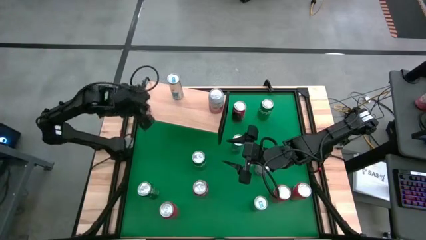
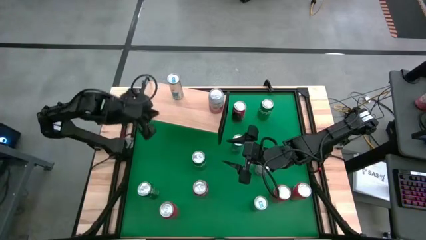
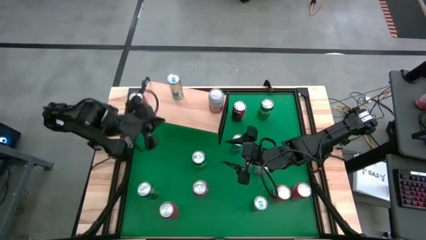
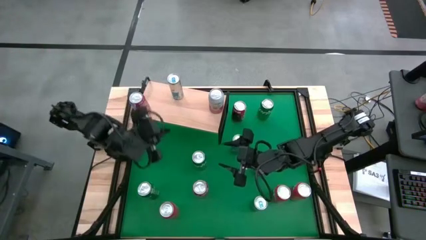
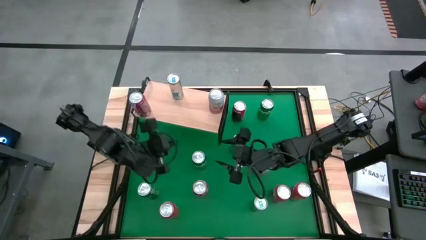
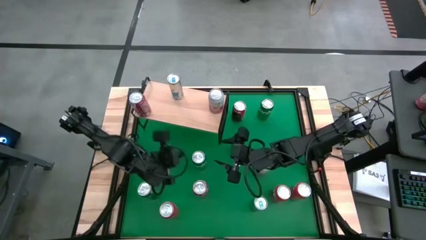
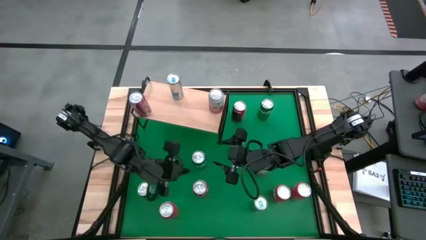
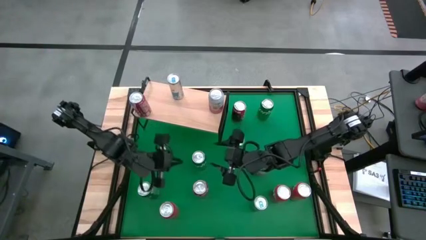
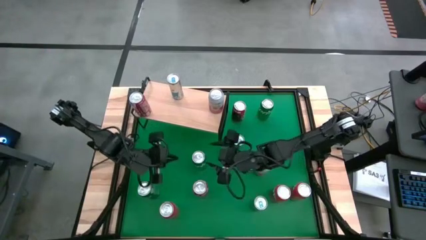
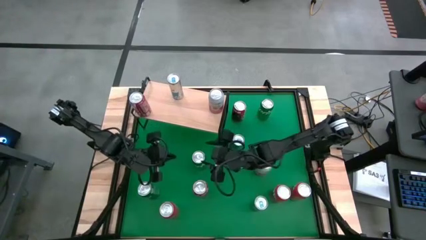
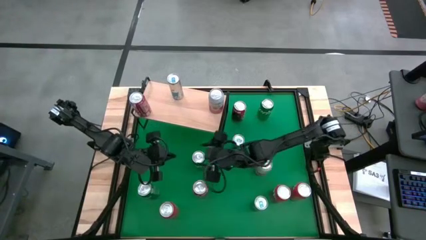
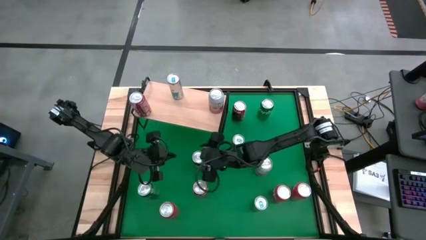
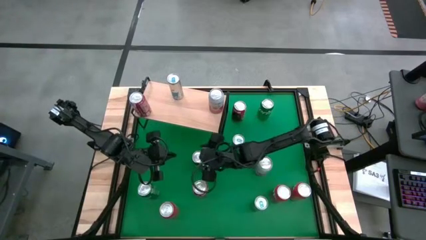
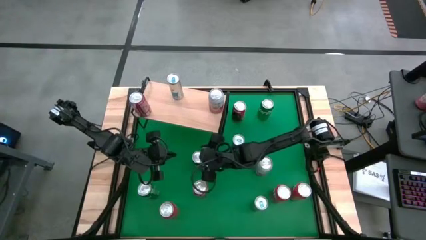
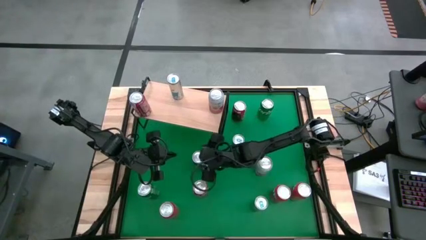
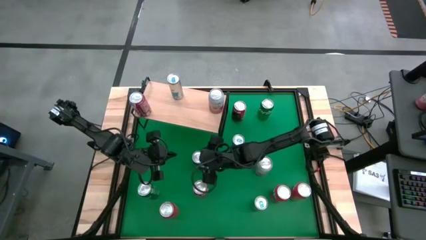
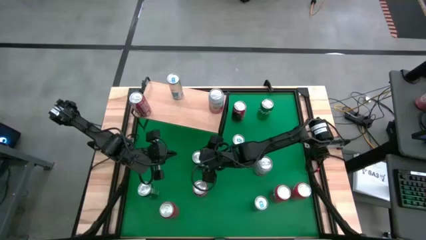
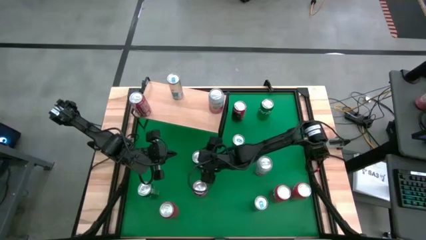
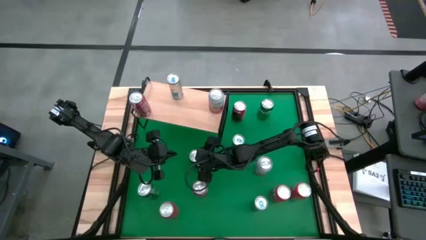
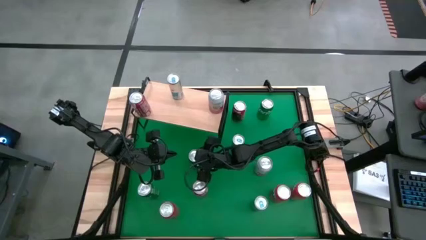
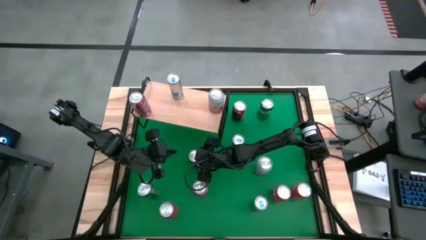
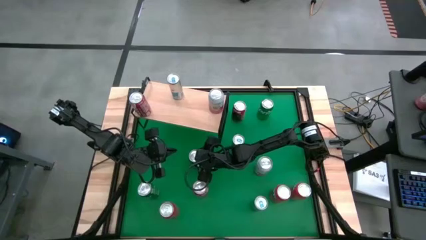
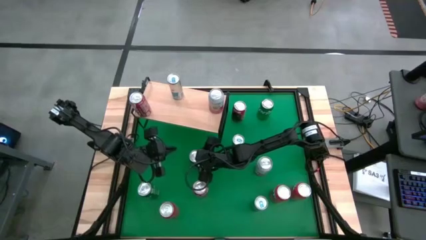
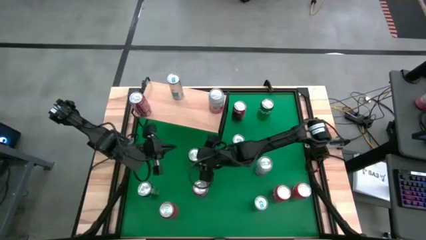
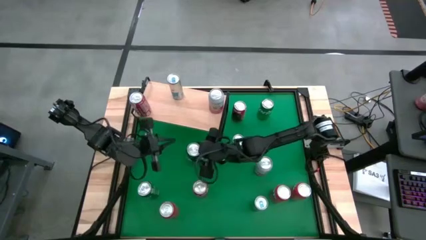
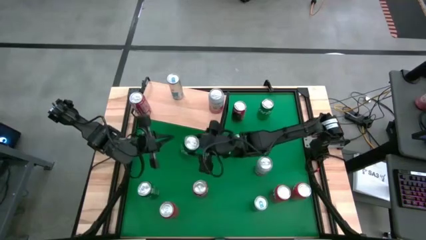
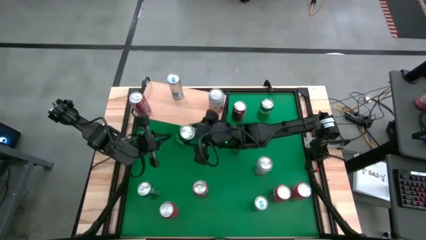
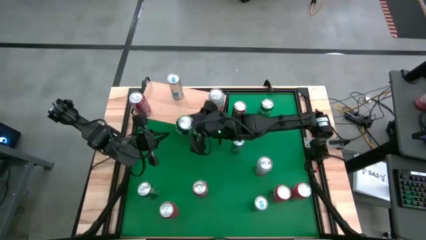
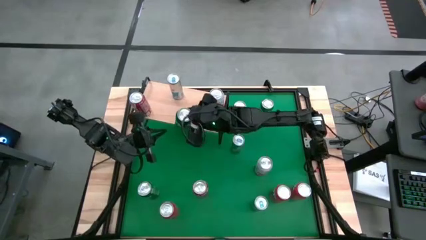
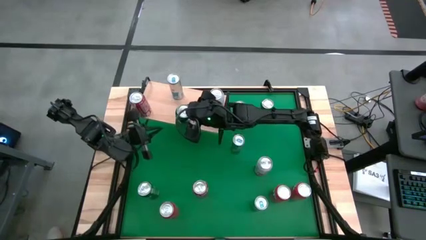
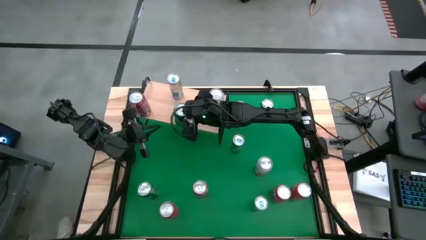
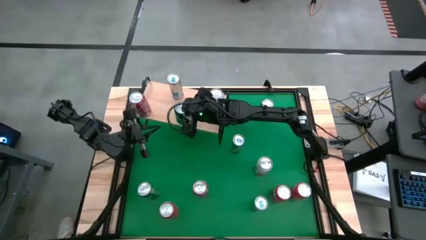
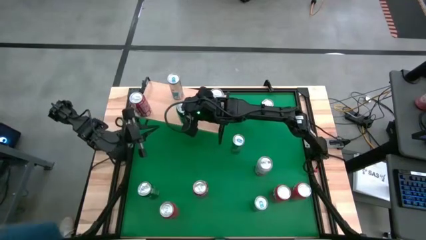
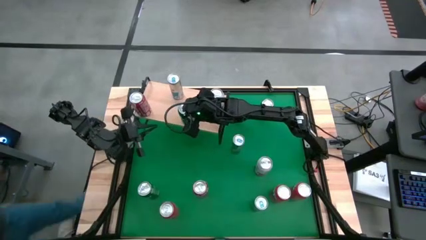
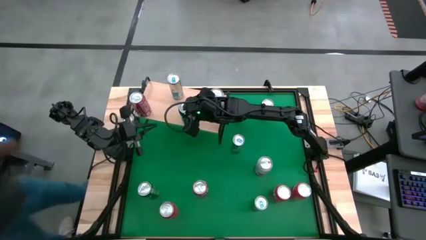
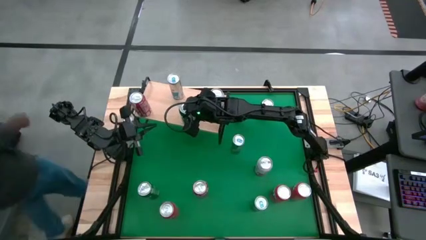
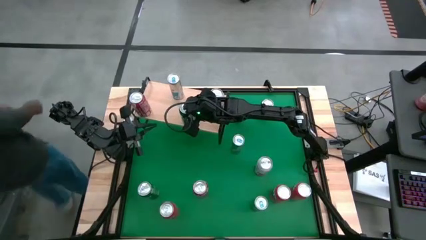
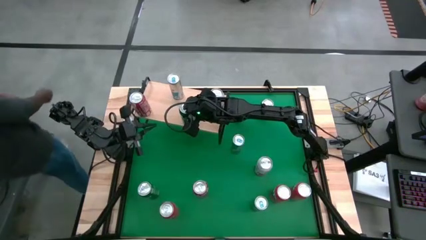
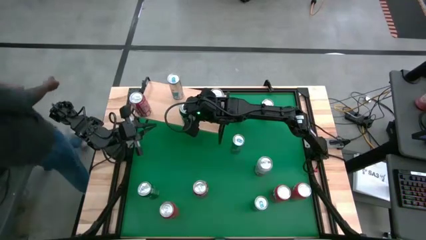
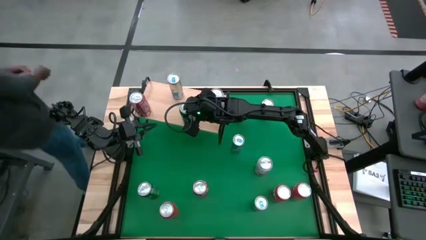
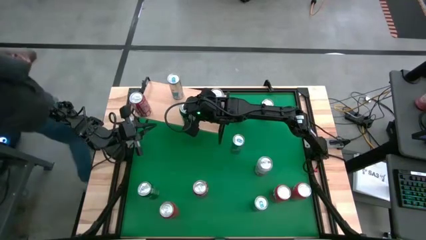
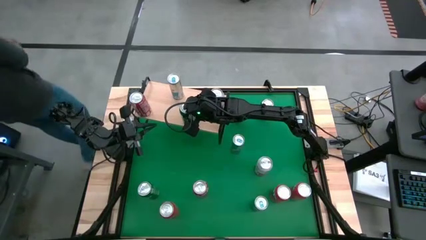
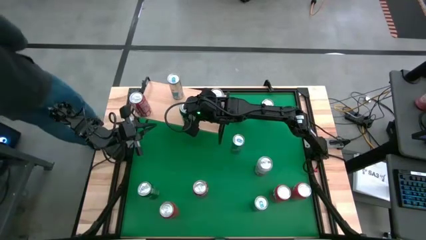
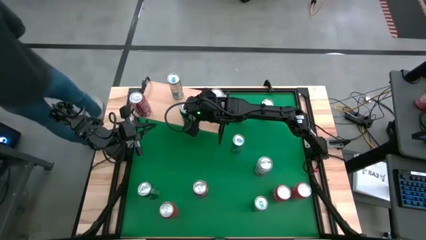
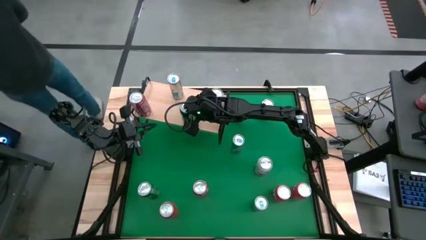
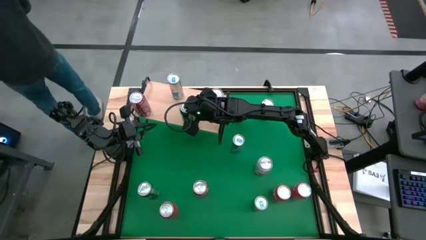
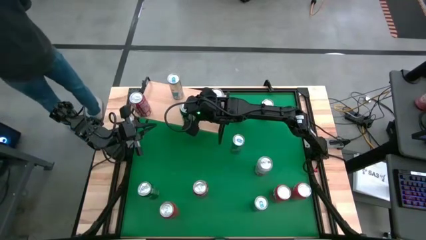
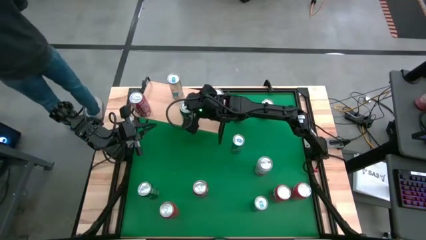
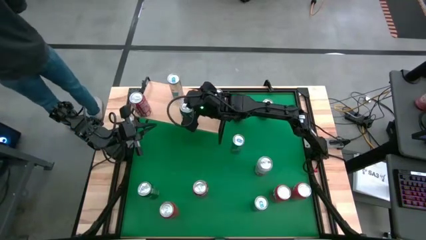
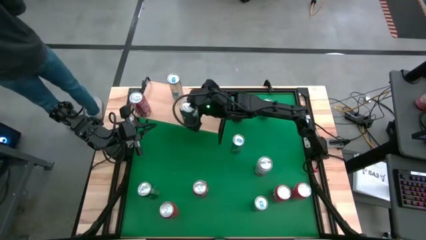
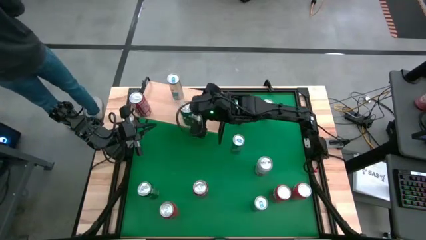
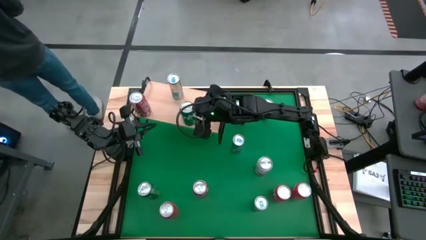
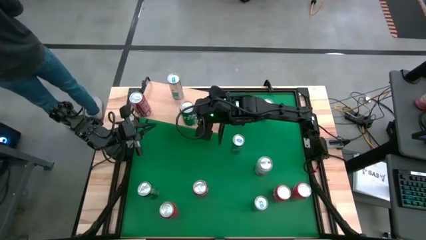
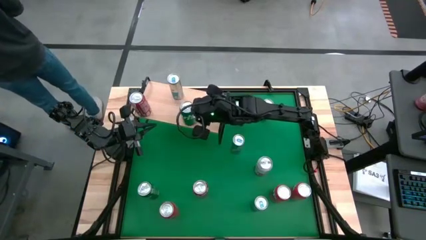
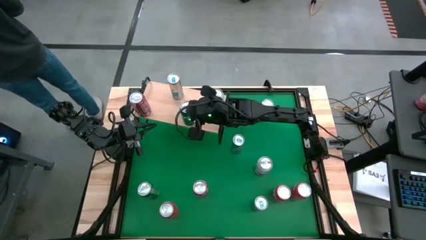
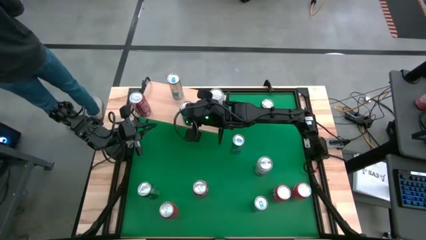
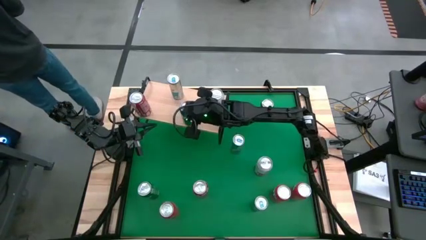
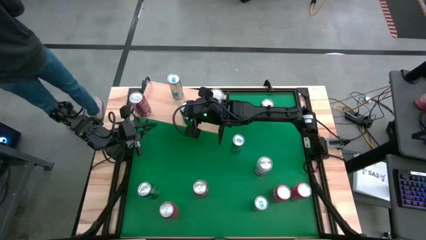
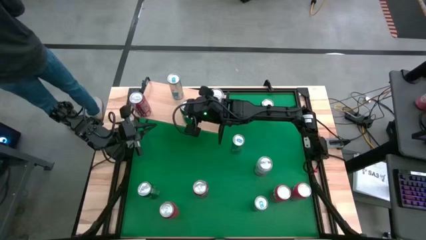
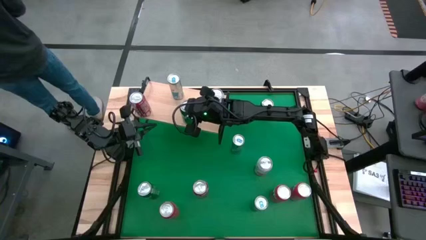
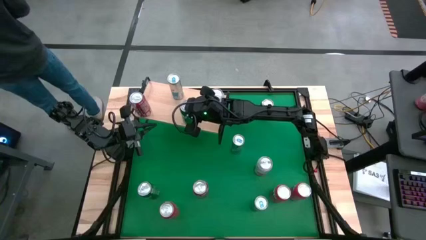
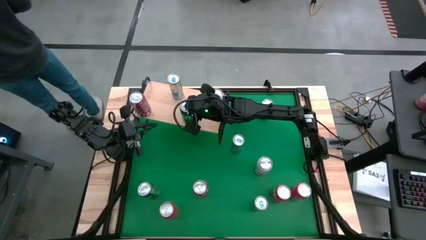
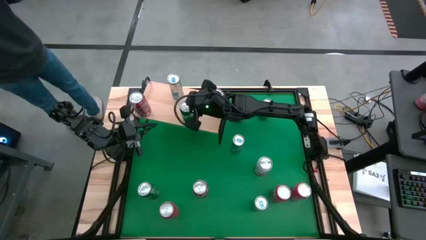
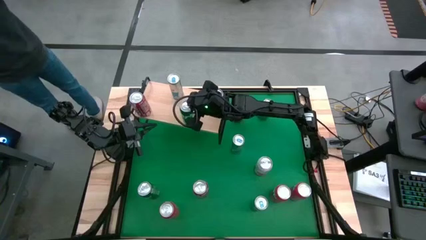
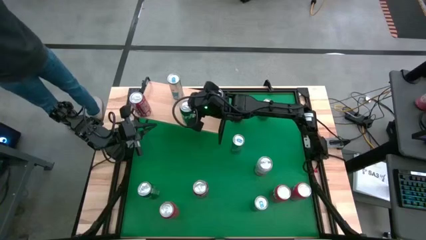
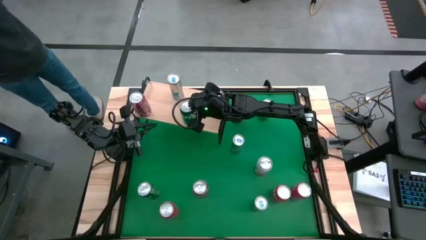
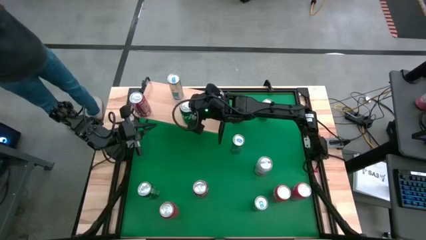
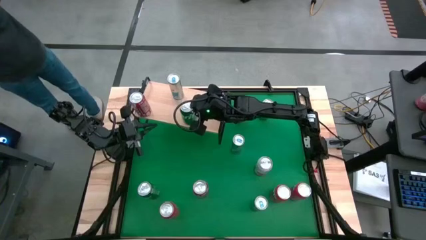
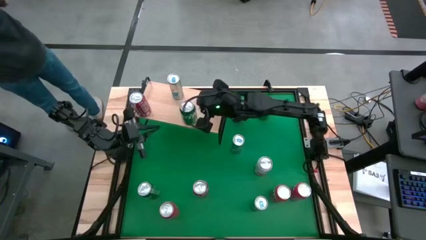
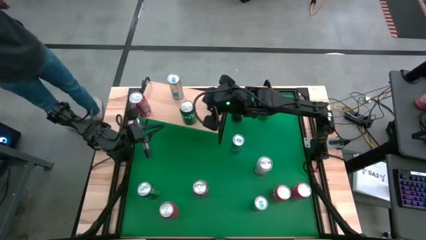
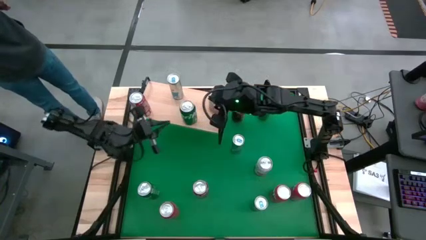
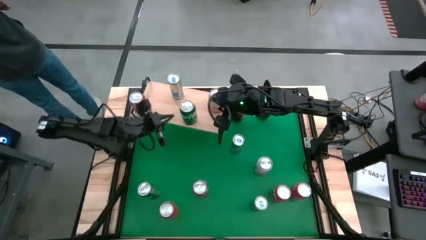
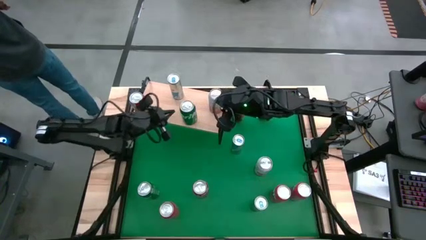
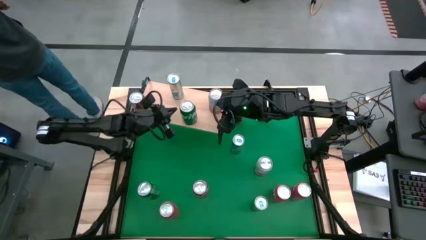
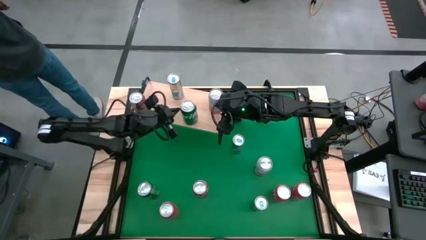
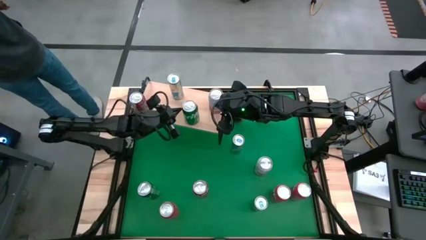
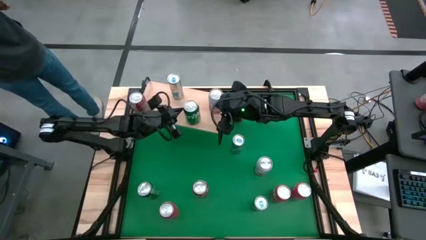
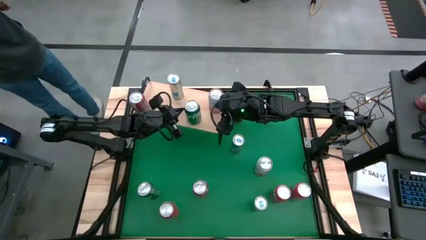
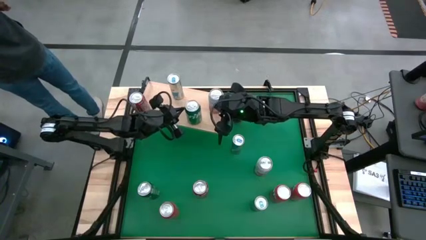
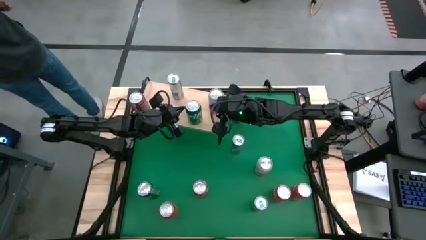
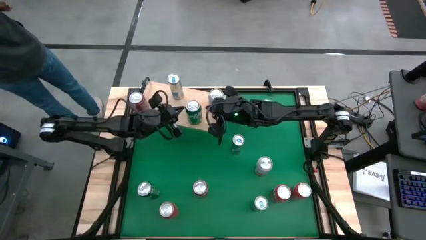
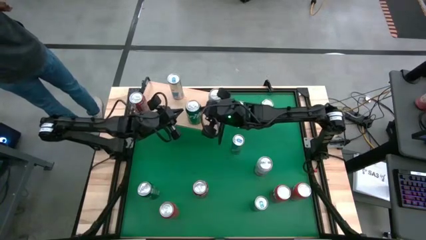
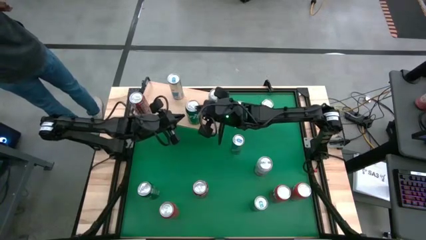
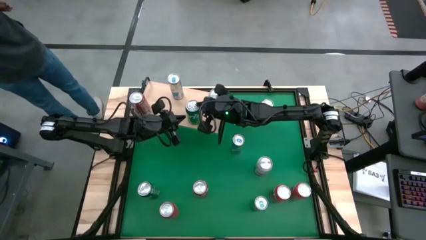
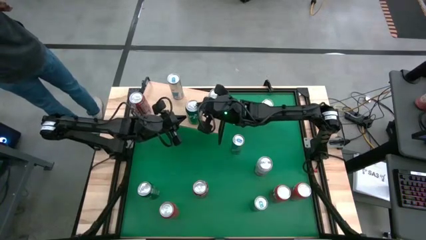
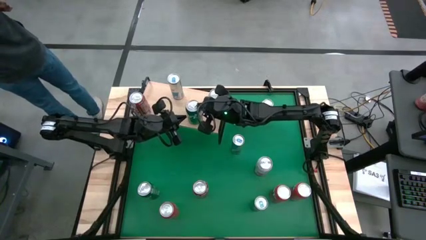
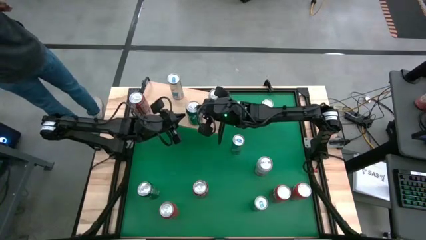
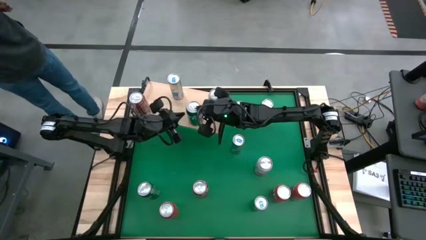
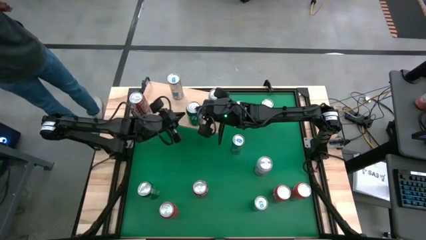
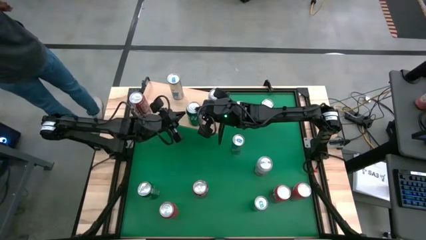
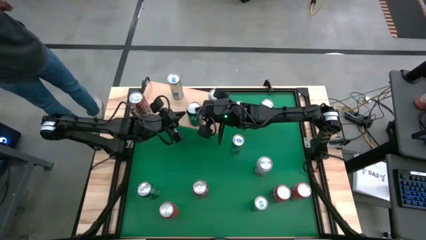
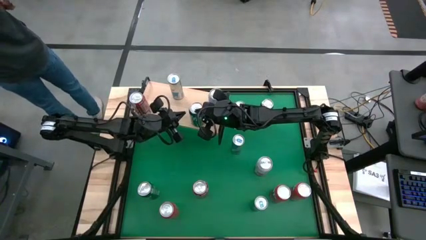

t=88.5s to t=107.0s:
Task: Place canned beverage on shelf
Put the green soda can on the shelf
